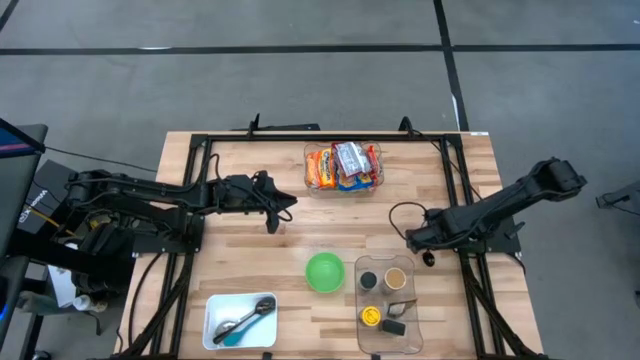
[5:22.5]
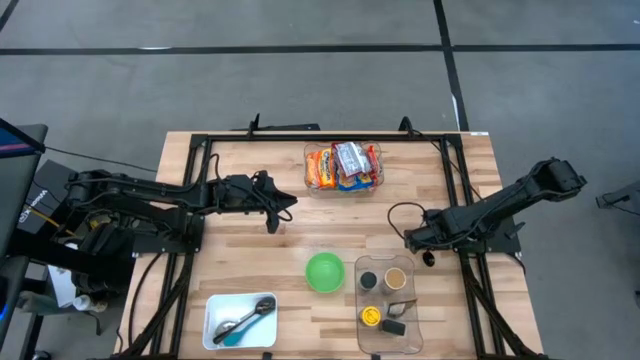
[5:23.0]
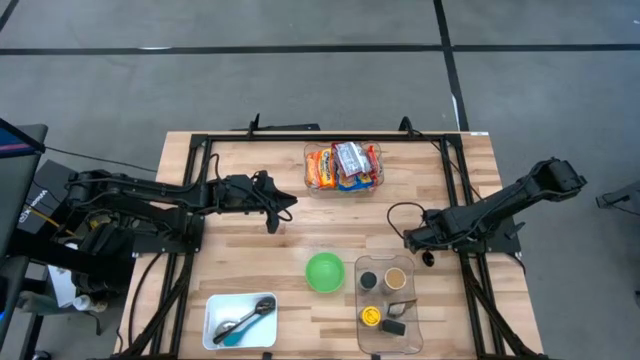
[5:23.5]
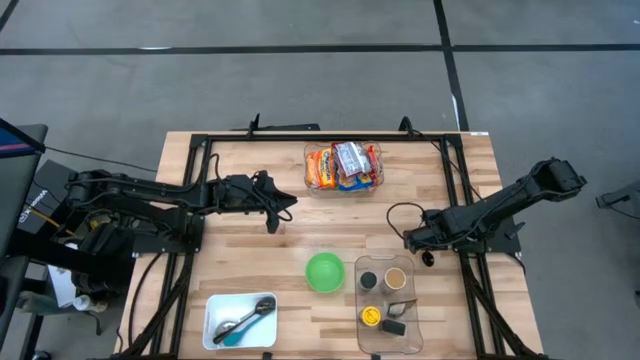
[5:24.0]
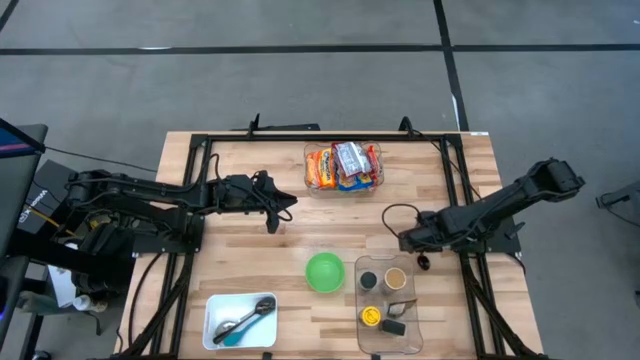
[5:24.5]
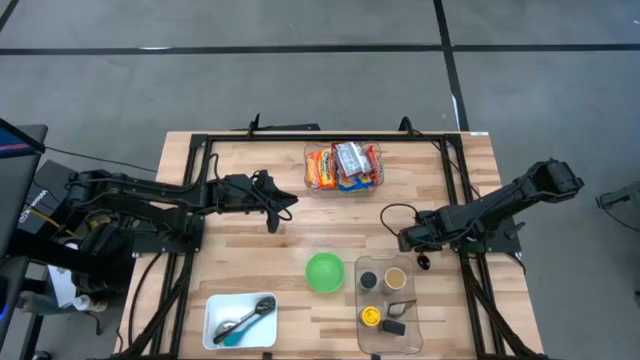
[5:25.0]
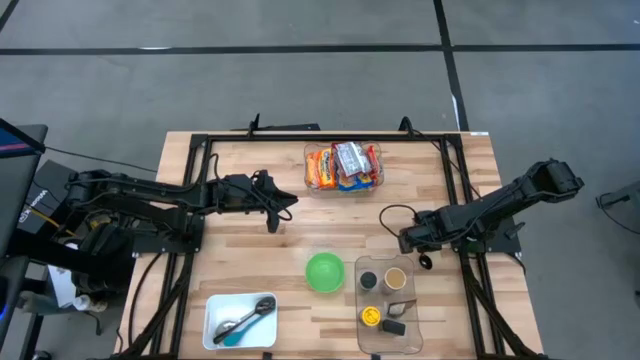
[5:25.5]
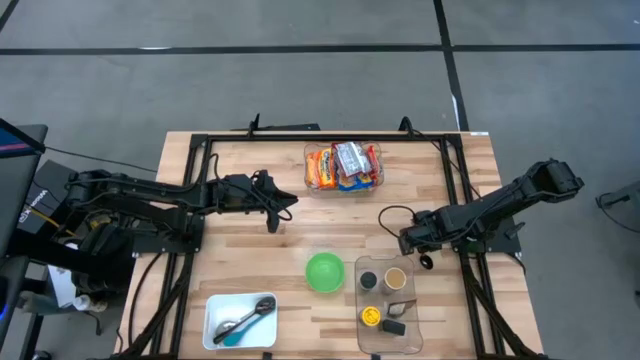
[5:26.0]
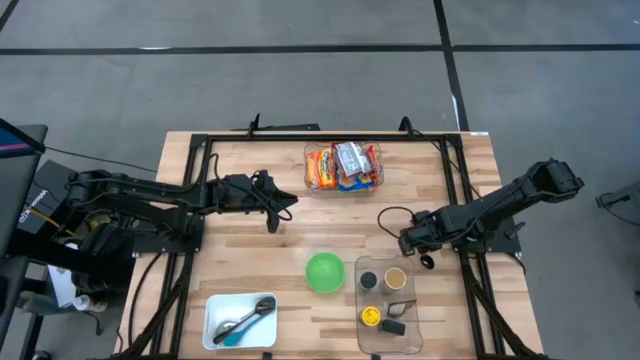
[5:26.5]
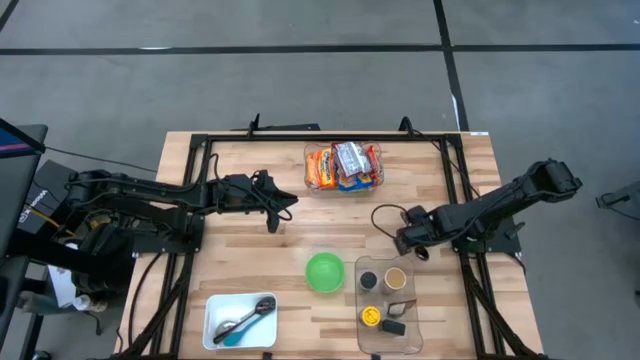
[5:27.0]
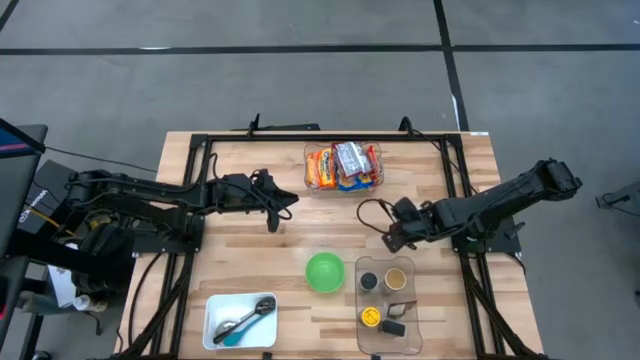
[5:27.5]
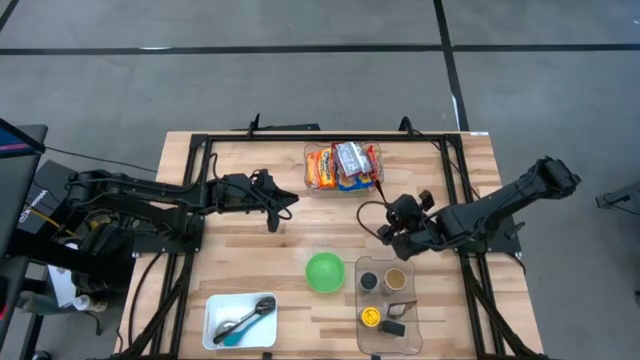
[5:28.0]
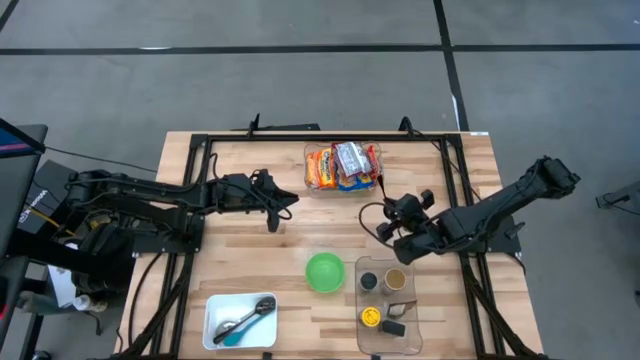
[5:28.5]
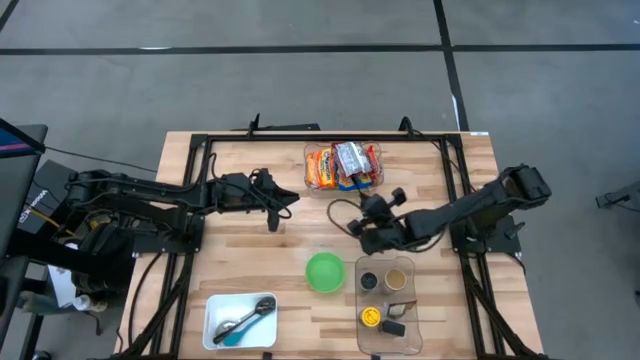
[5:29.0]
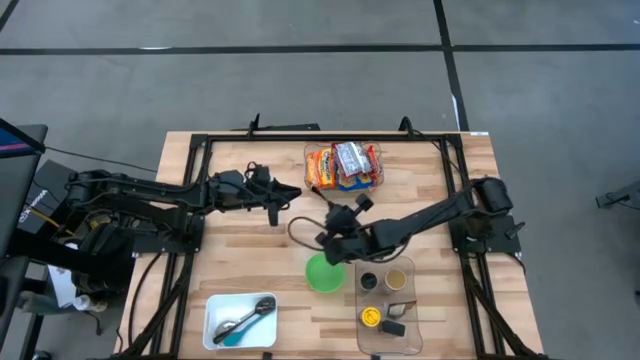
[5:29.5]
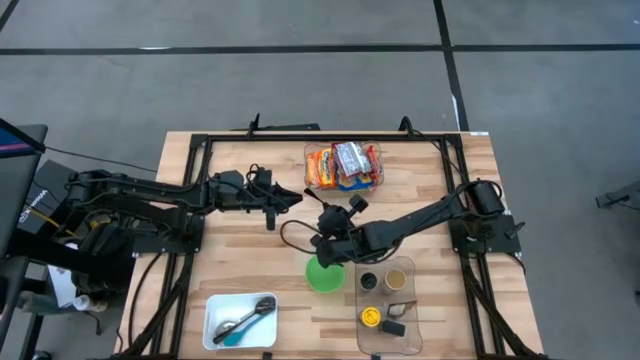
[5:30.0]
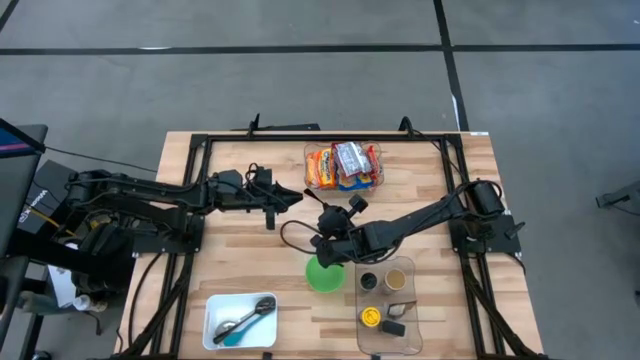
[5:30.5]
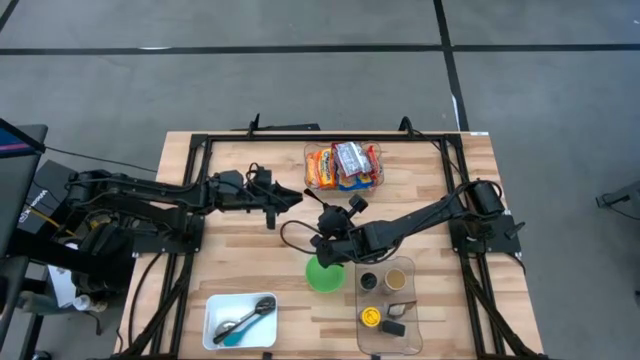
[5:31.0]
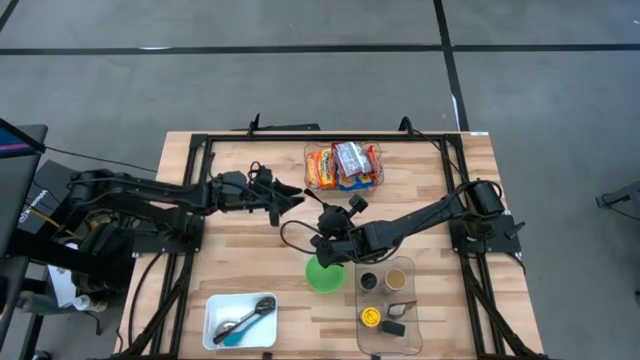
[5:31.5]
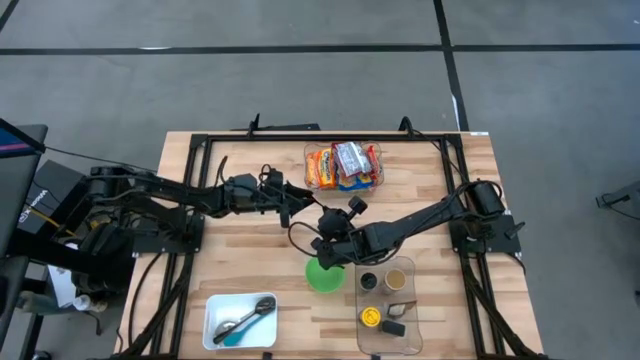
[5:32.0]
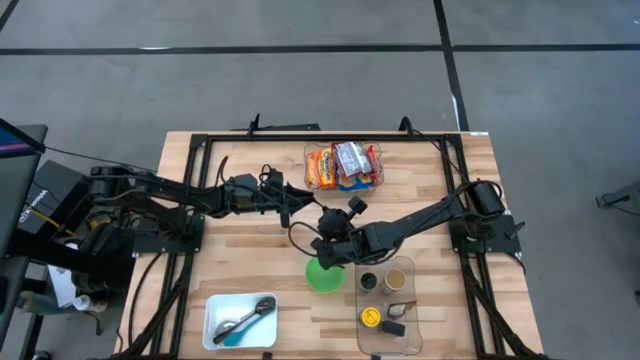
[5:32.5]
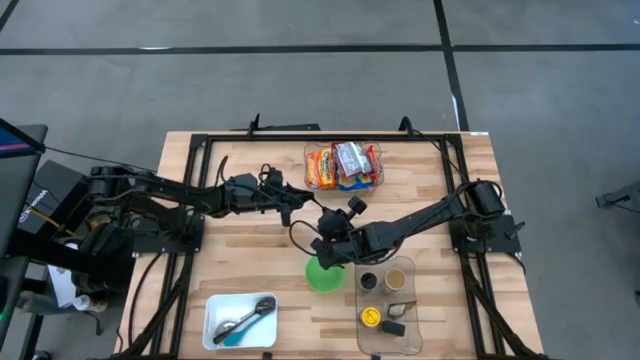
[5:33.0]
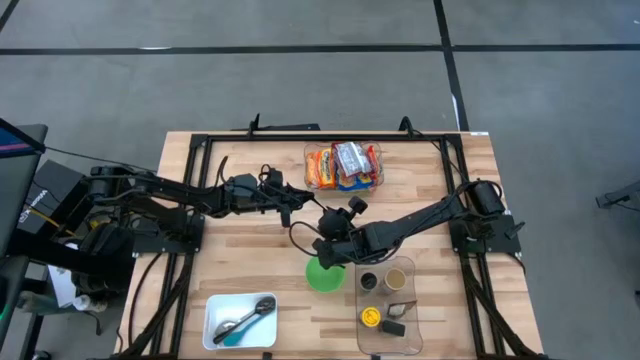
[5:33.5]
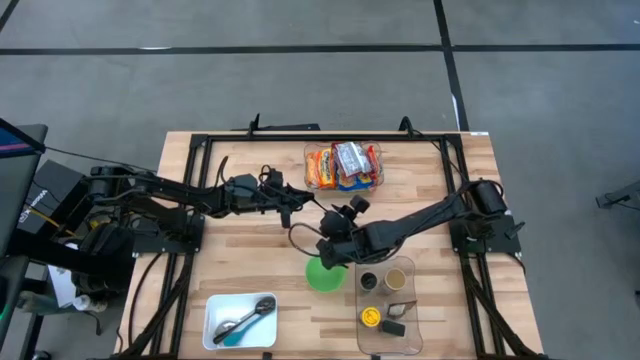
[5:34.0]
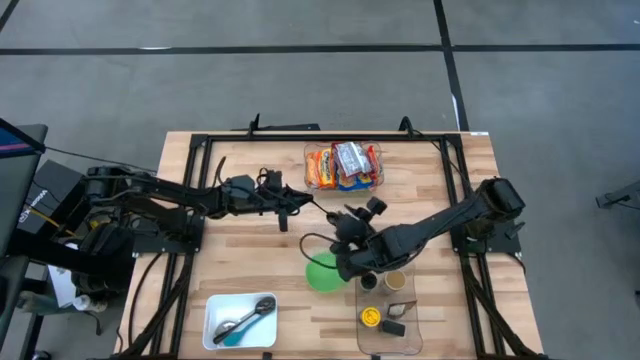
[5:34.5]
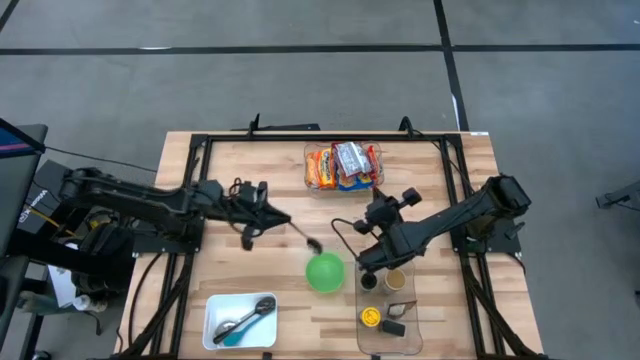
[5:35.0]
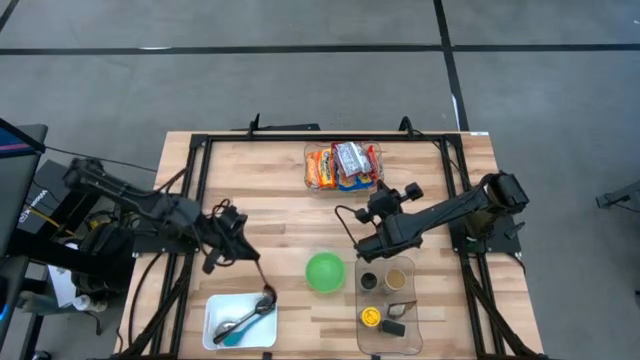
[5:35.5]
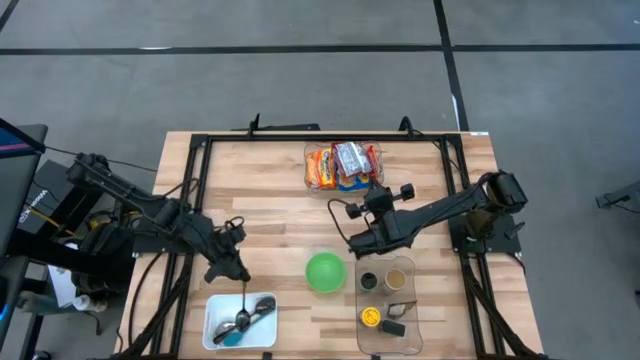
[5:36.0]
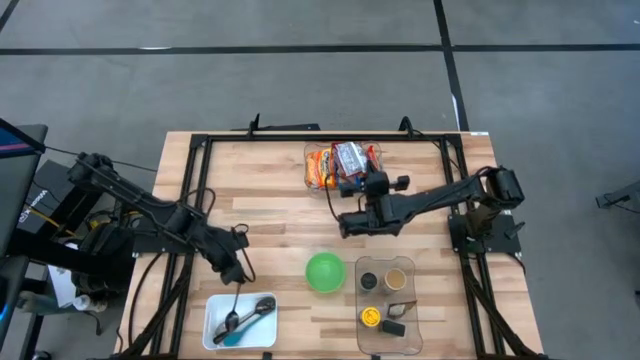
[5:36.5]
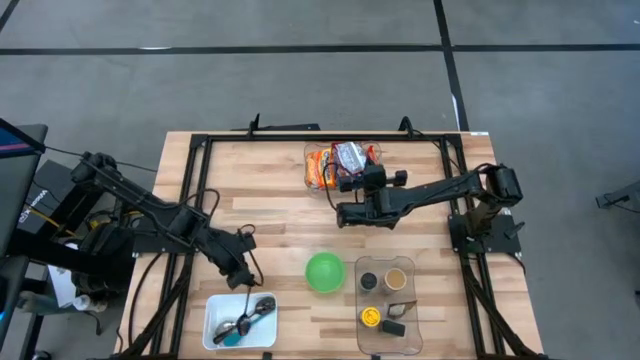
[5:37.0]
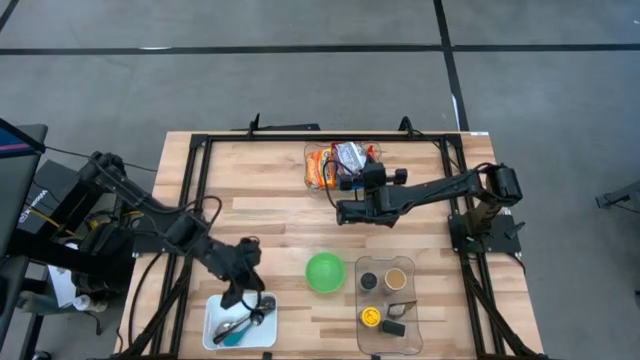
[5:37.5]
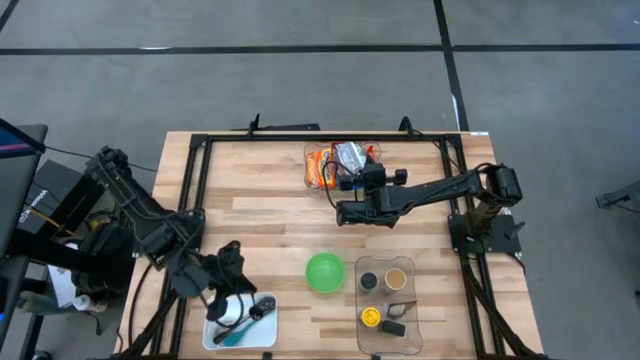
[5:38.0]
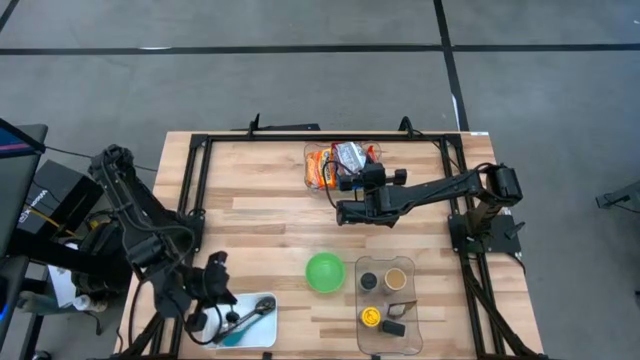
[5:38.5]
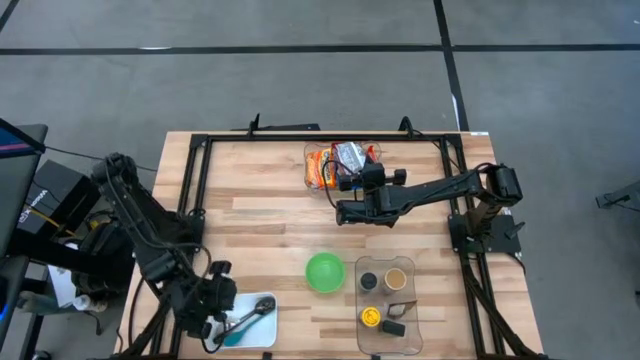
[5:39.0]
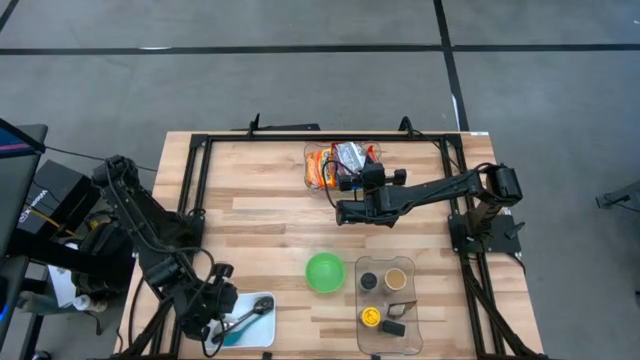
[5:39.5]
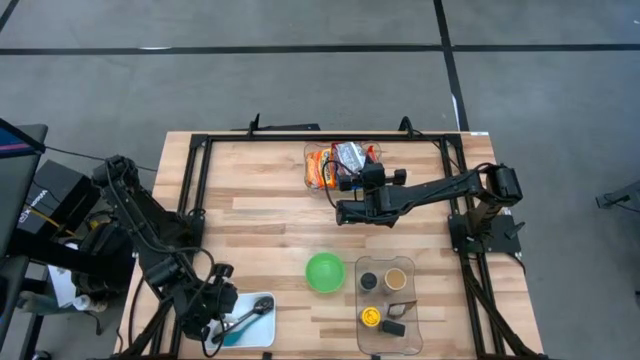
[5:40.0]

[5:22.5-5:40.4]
Task: Pick & Place Food Item
Put the black spoon into the white bin

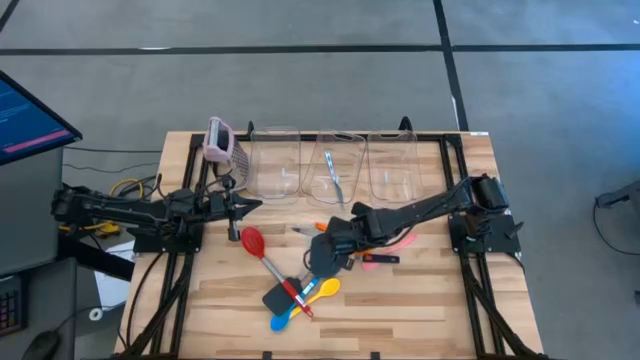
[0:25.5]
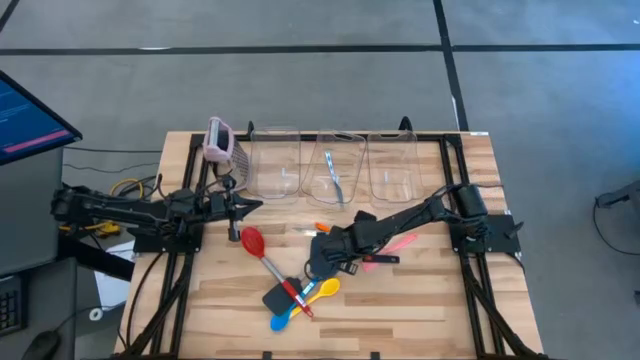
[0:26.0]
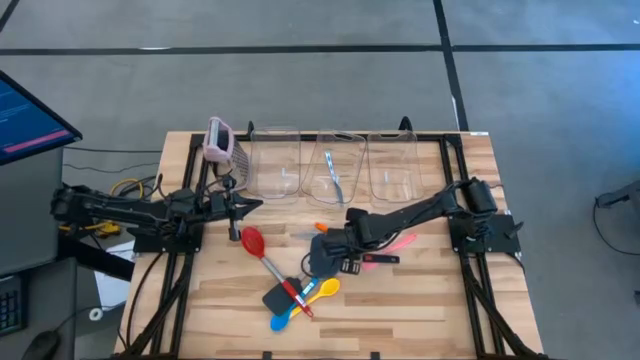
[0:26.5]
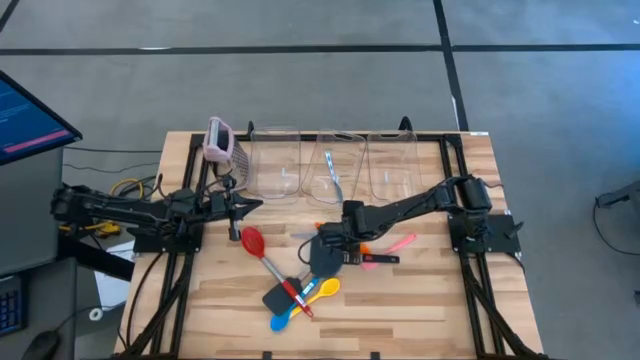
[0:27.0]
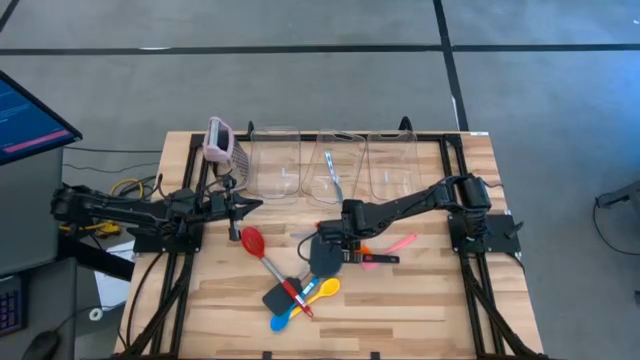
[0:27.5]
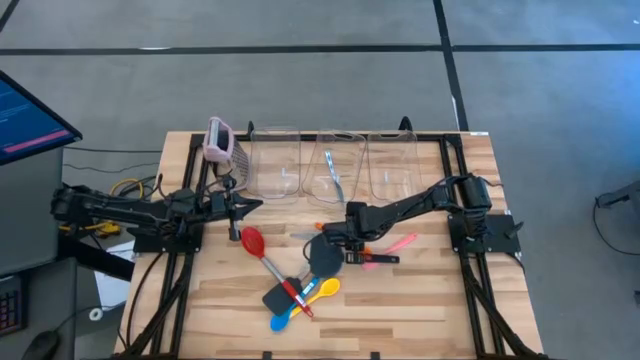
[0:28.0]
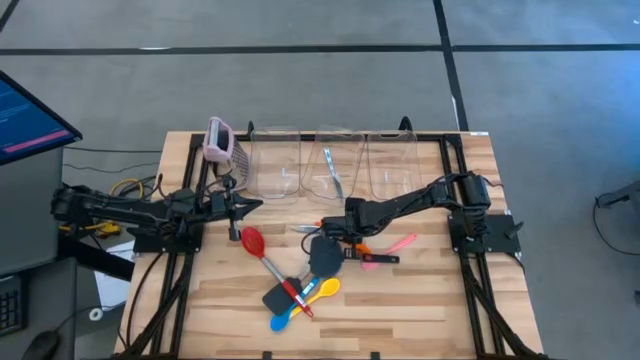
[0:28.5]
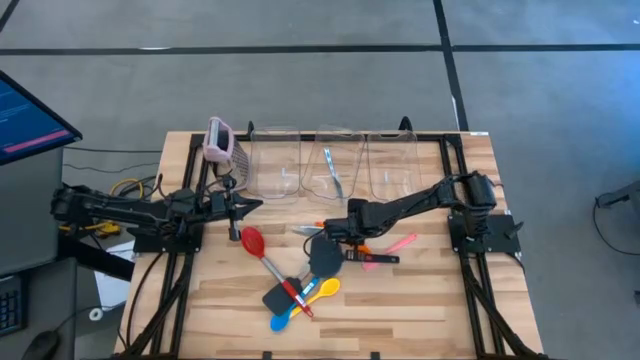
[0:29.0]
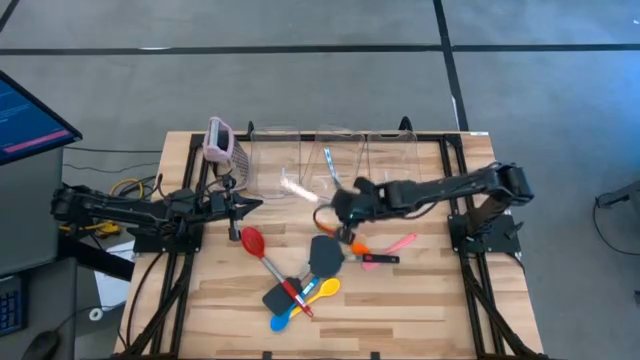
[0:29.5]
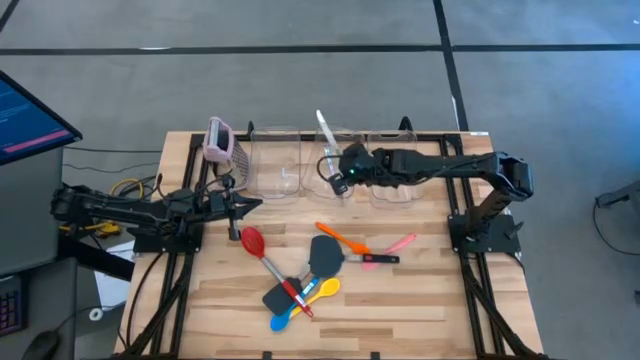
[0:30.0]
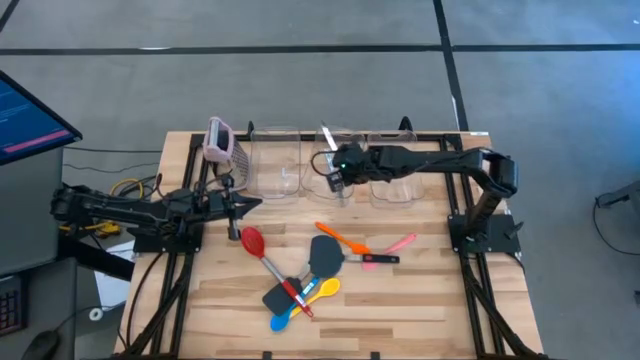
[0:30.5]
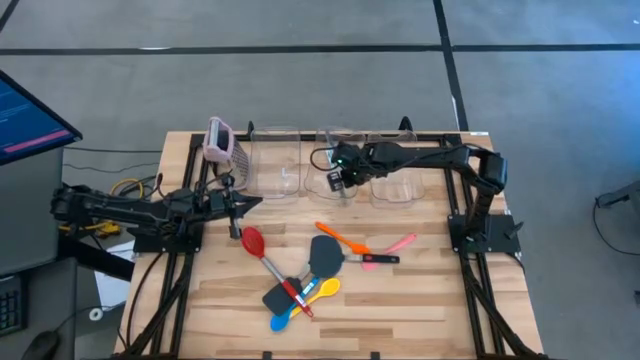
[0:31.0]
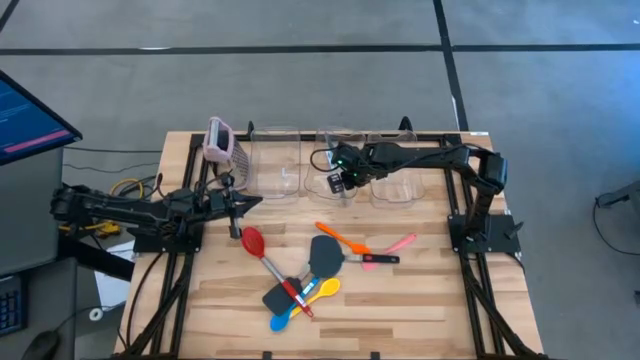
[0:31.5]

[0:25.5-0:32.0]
Task: Pick & Place Kitchen Items
Put the green table knife into the middle transparent bin
